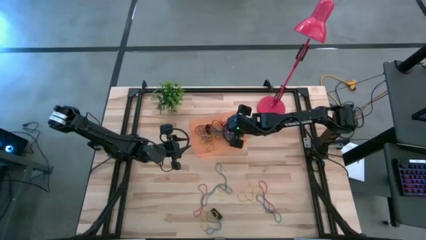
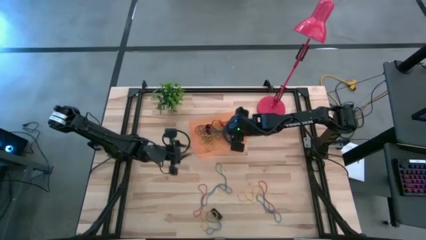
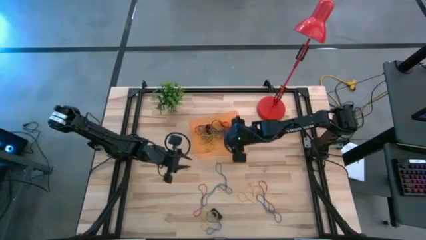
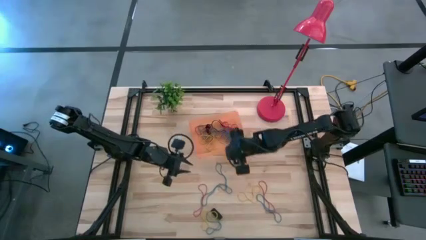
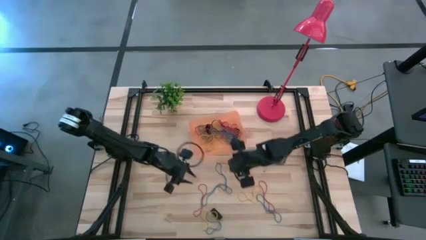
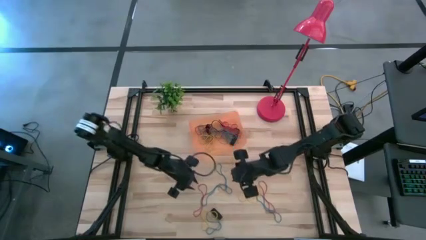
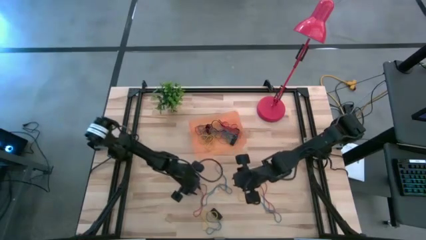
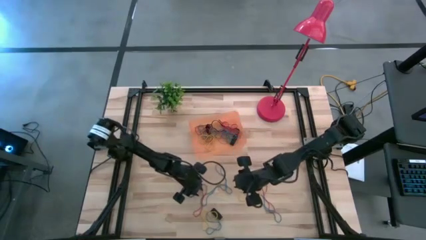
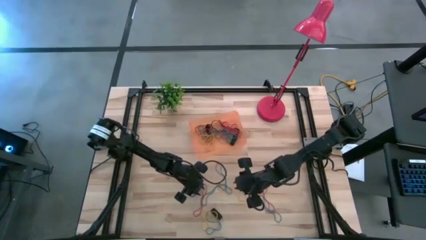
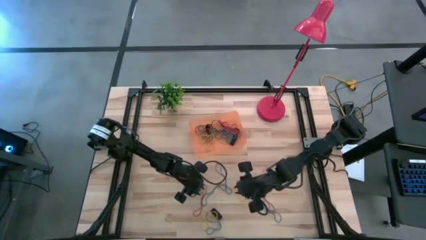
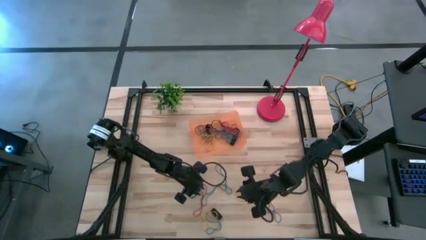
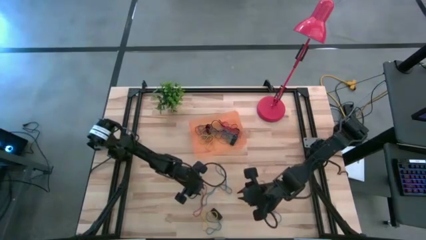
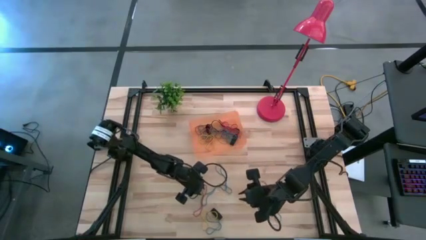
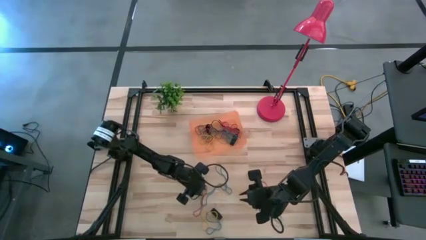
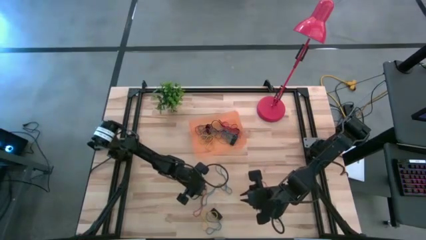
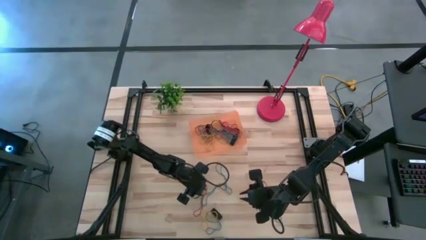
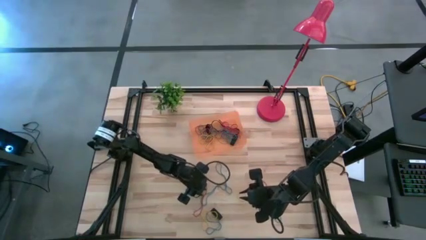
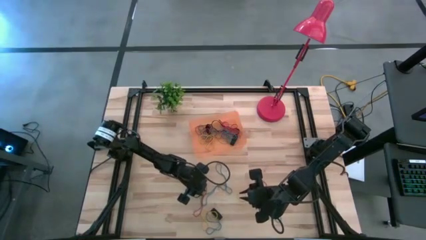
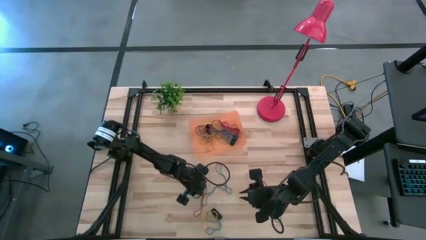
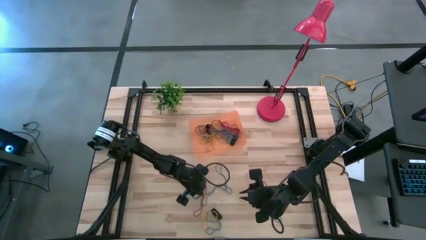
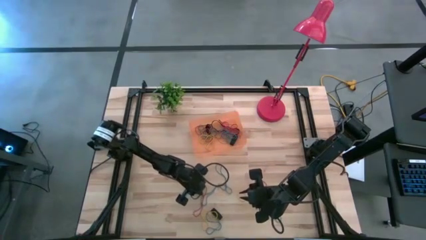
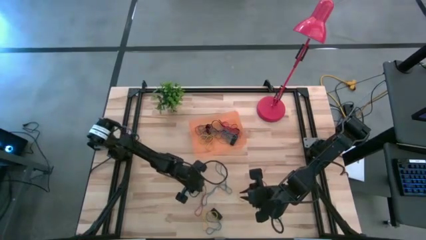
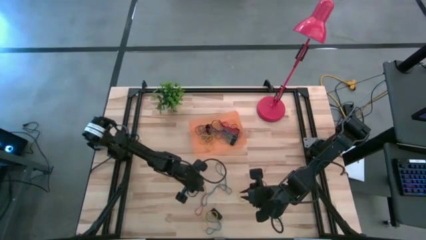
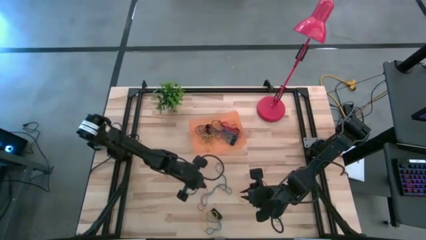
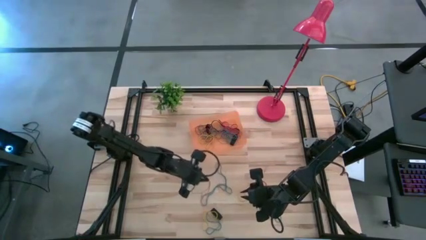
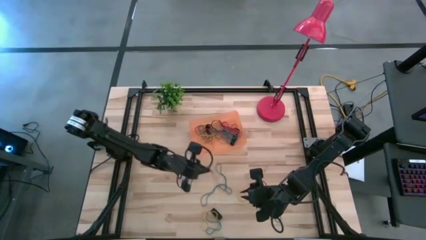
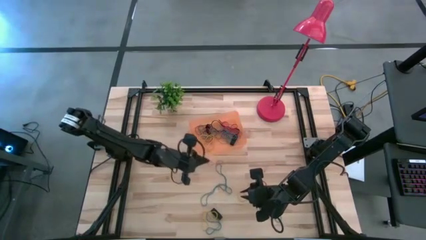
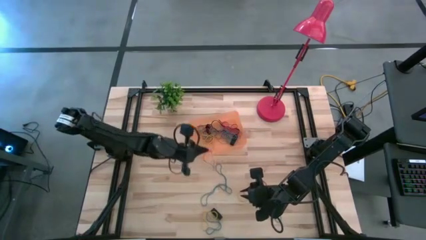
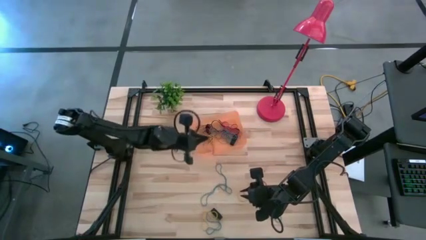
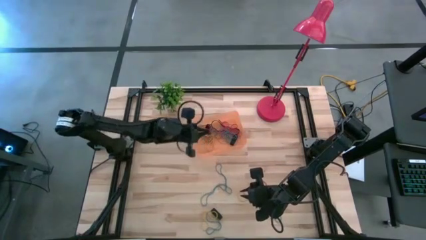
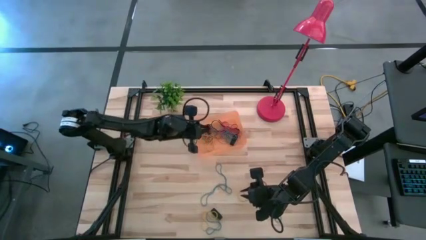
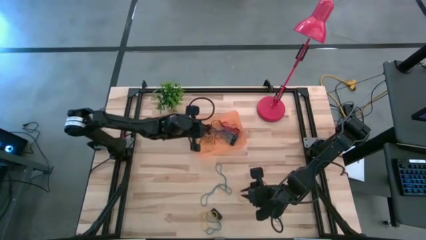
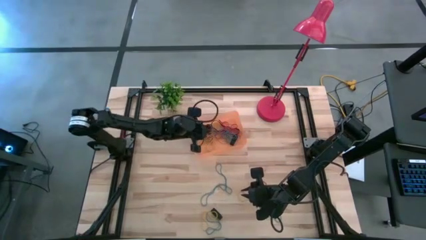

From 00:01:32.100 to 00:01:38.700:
Task: Pick and place rubber bands into bin
Put the red rubber band into the orange bin

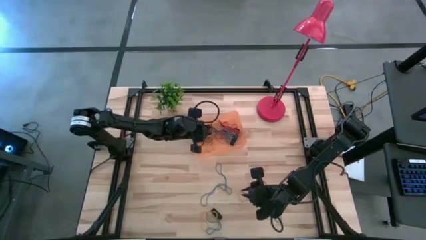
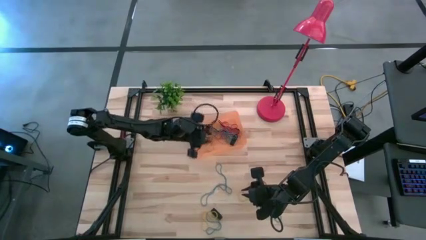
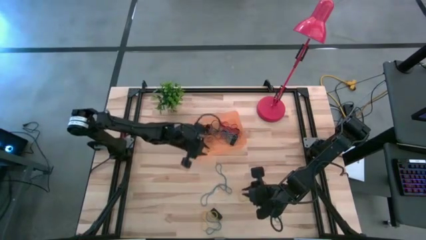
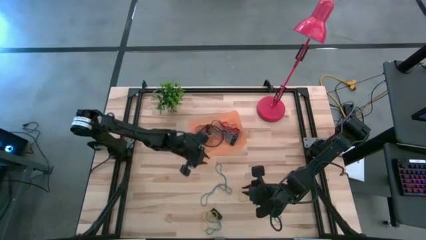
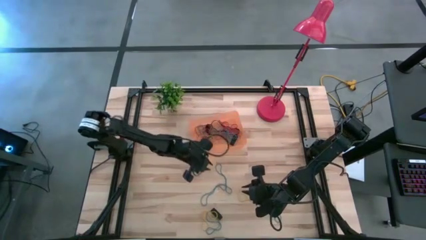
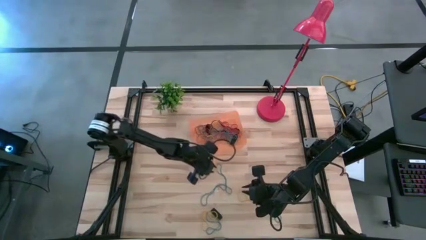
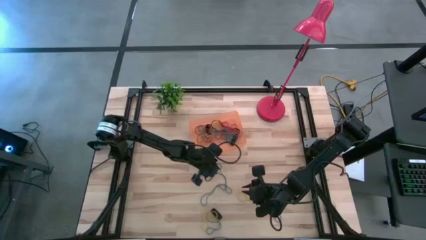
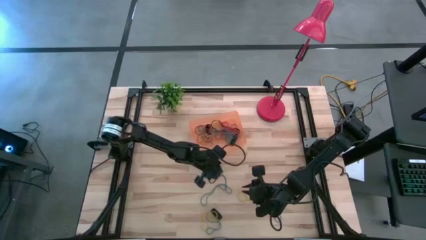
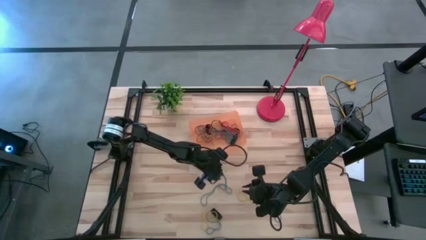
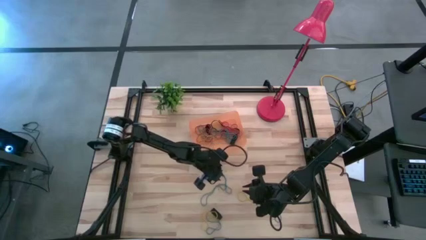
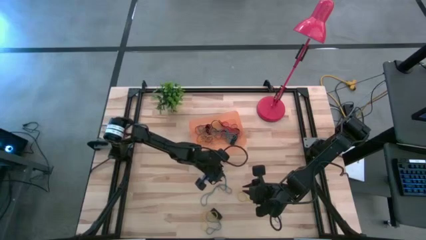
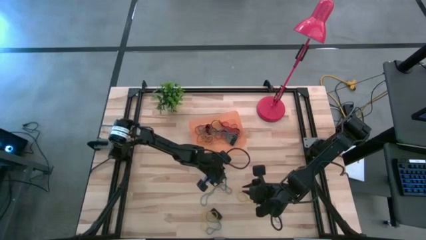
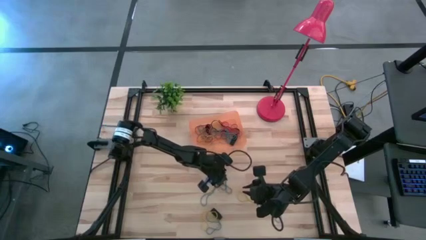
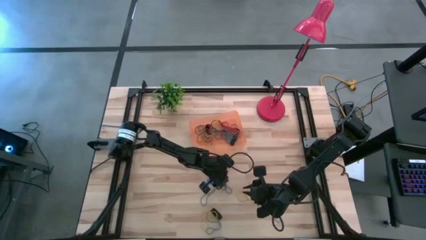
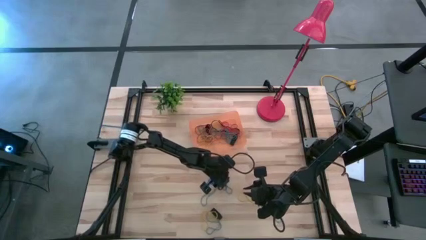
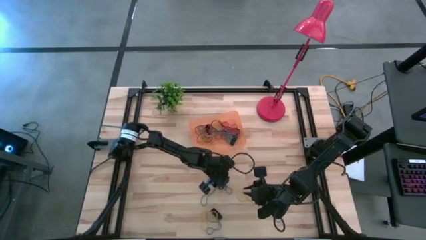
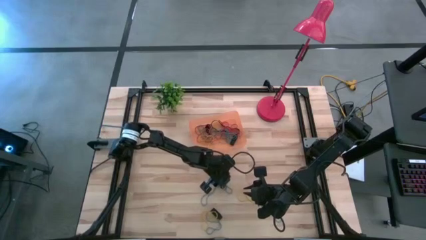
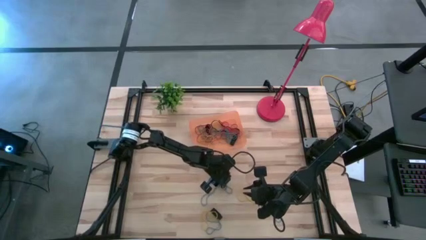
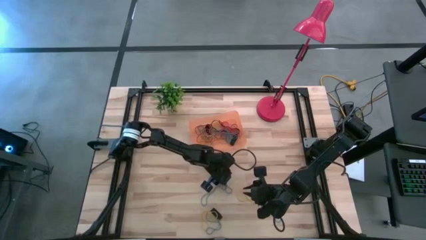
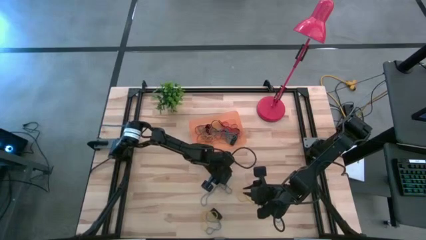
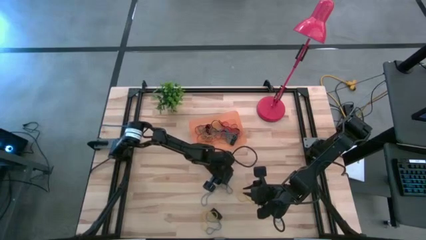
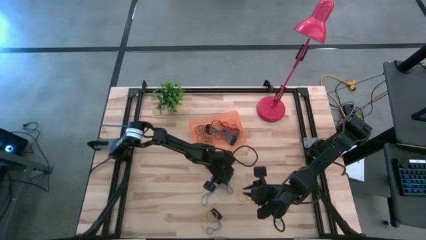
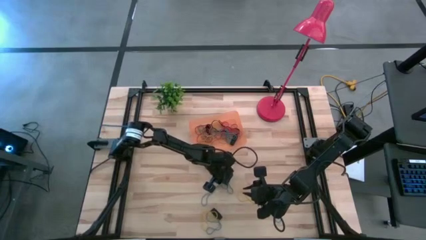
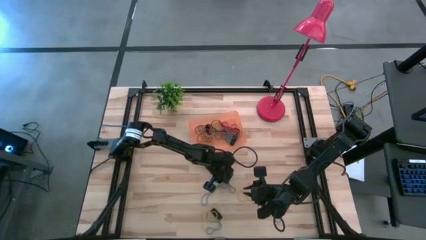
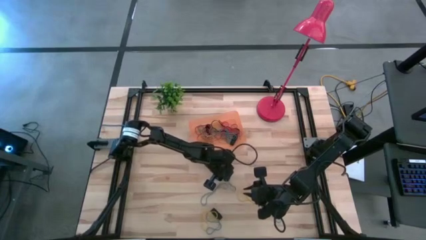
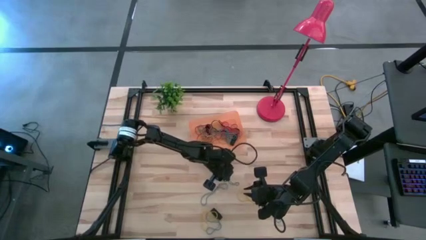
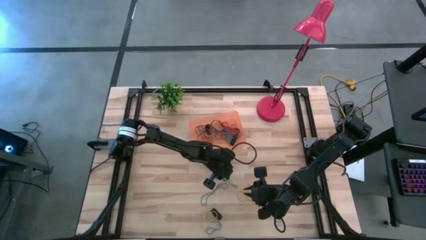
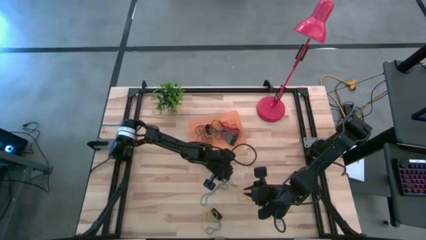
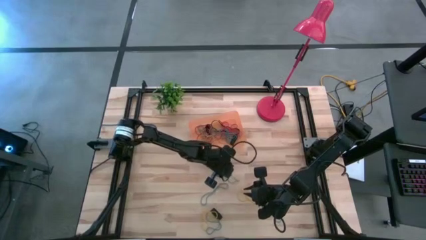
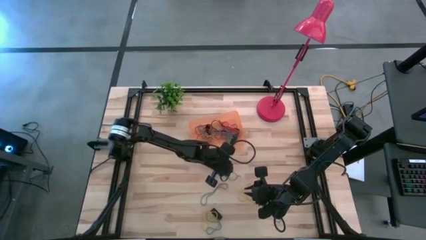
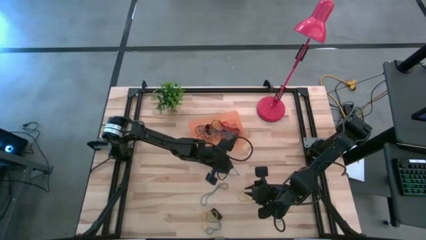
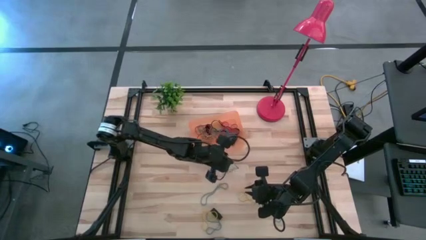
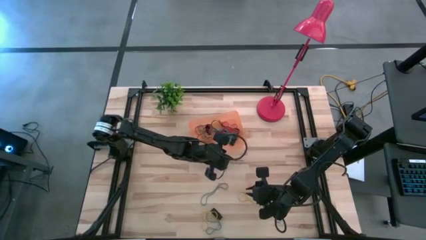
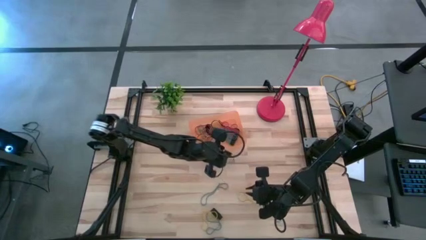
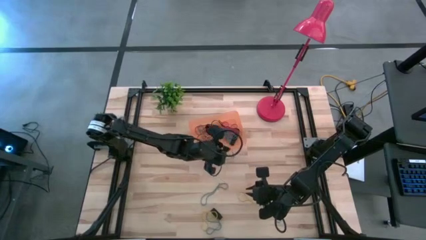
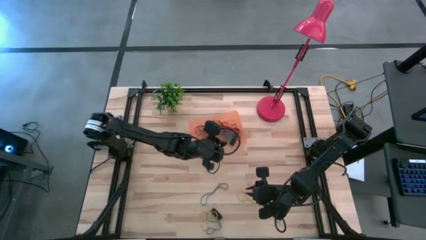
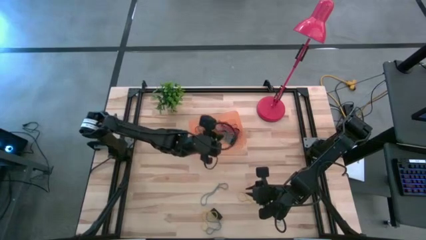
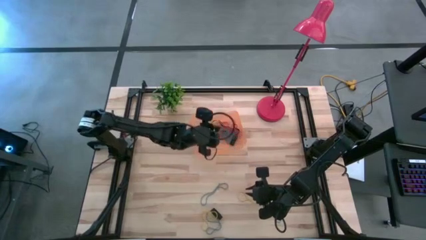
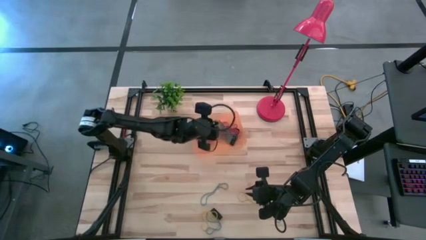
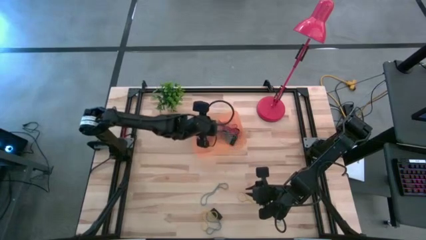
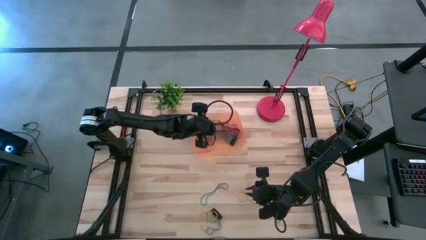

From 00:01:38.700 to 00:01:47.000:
Put the blue rubber band into the orange bin

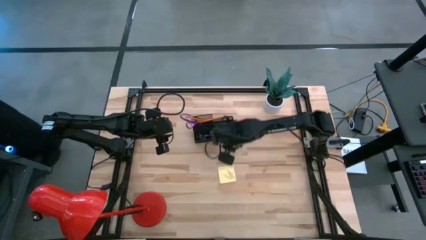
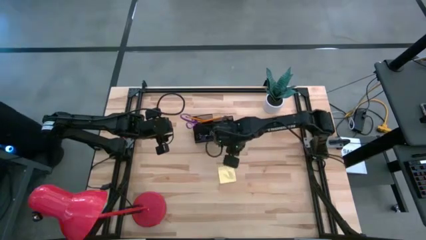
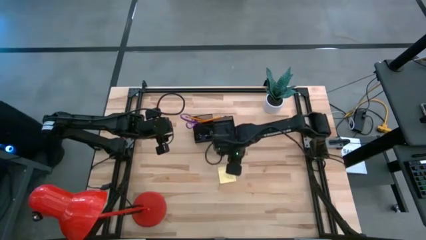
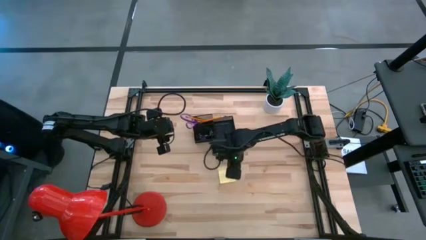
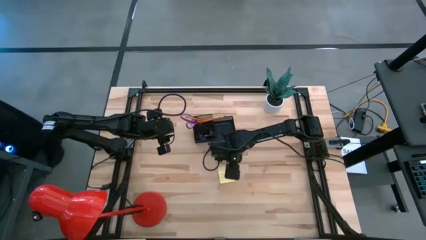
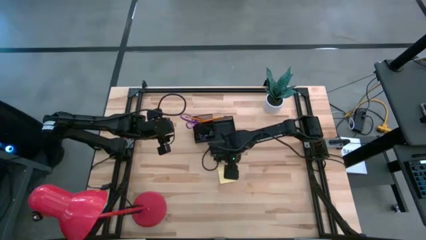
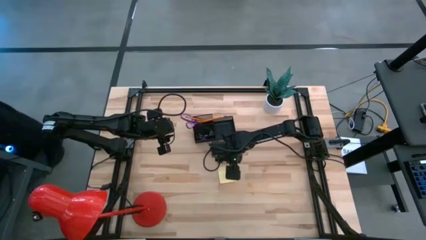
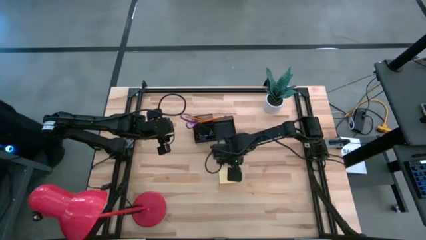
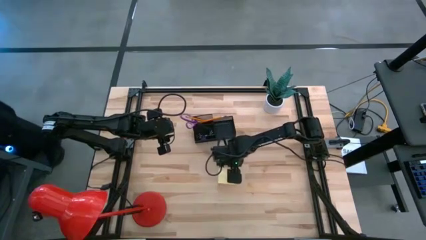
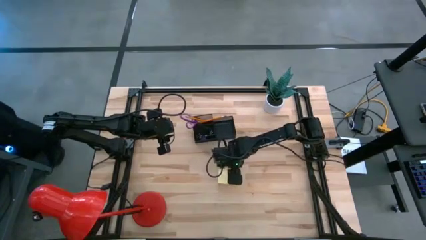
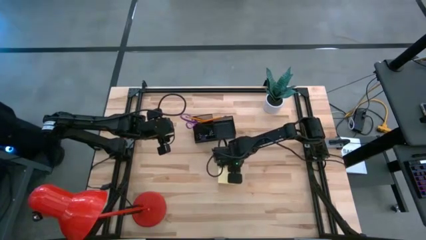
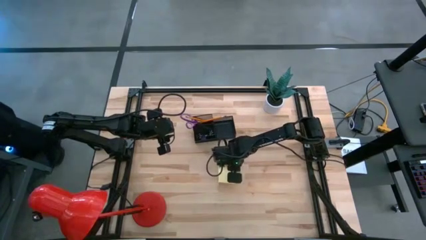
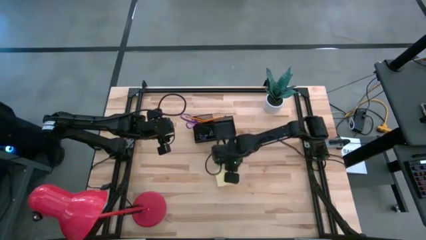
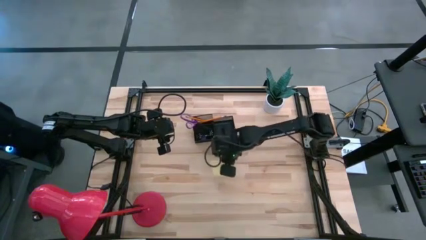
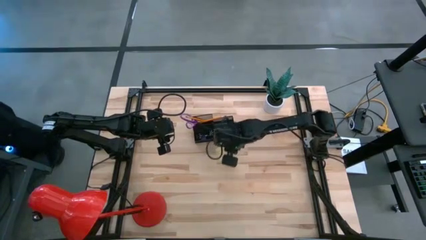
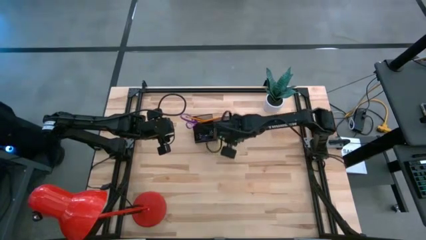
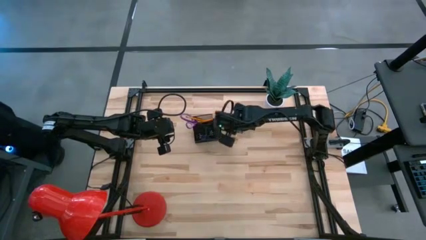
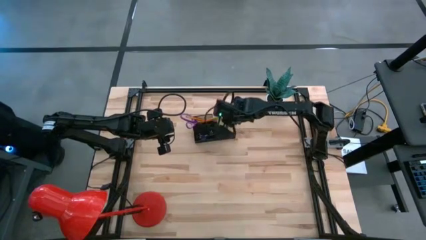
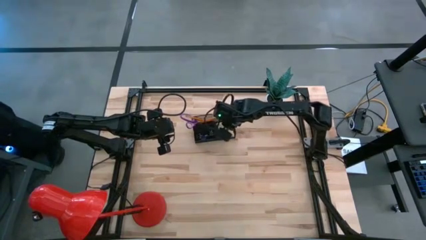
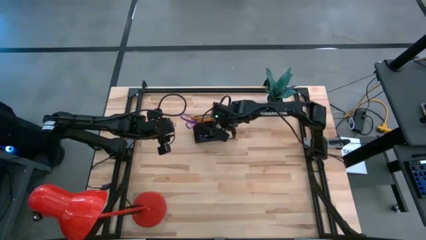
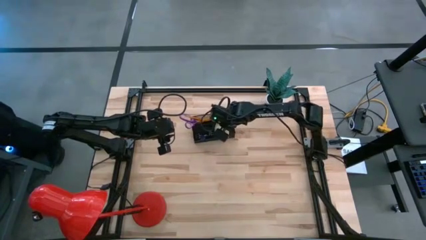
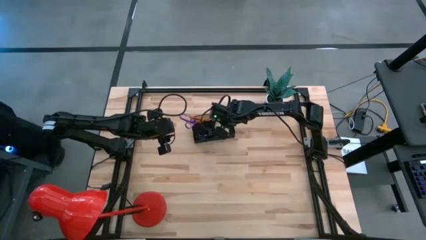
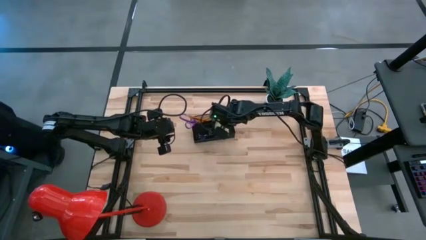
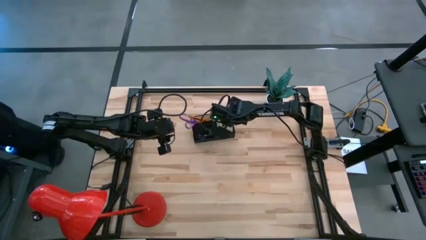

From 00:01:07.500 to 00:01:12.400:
Task: Pick and place office supplies into organizer
Put the yellow sticky notes into the black desk organizer
